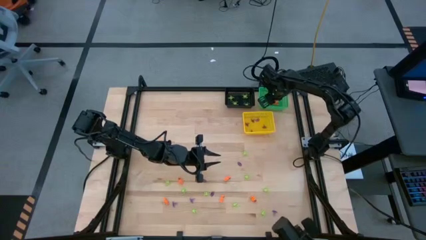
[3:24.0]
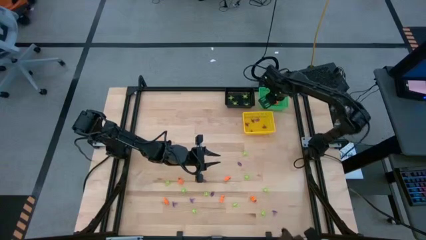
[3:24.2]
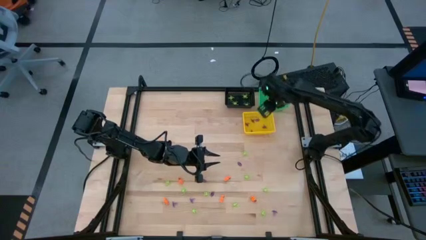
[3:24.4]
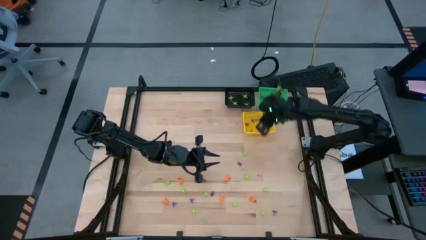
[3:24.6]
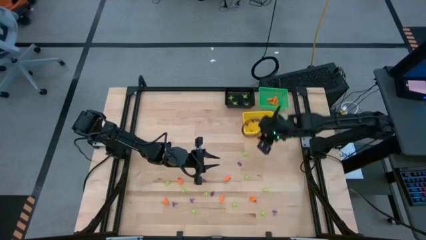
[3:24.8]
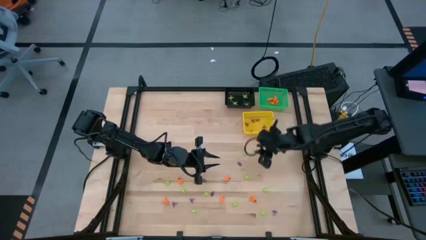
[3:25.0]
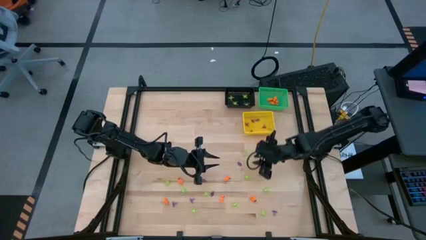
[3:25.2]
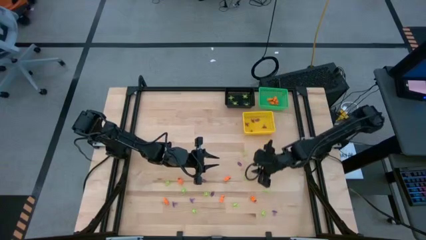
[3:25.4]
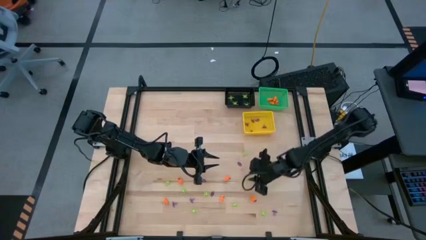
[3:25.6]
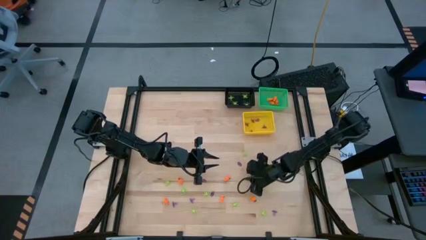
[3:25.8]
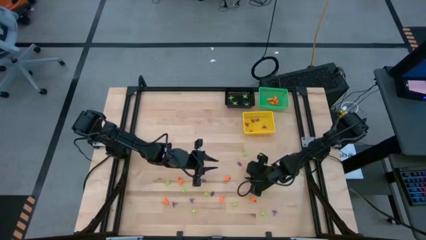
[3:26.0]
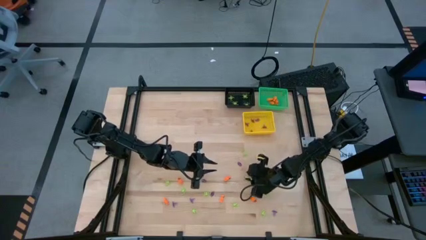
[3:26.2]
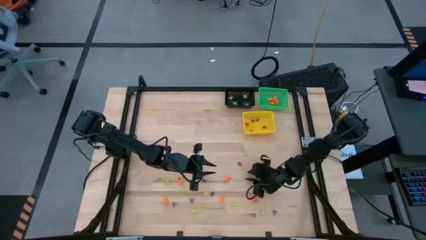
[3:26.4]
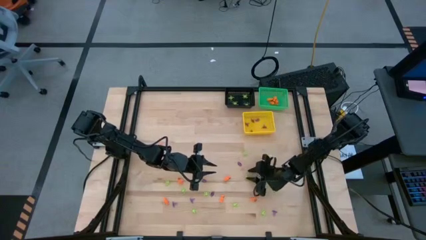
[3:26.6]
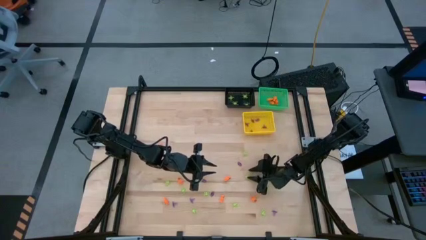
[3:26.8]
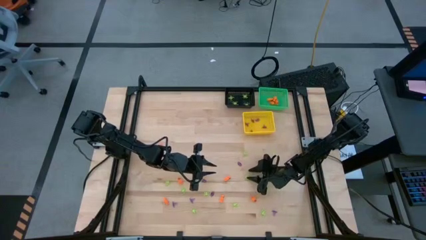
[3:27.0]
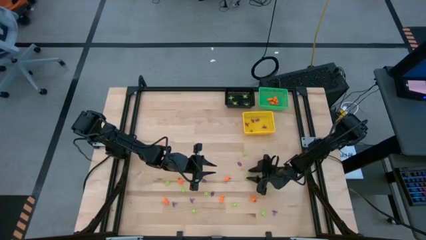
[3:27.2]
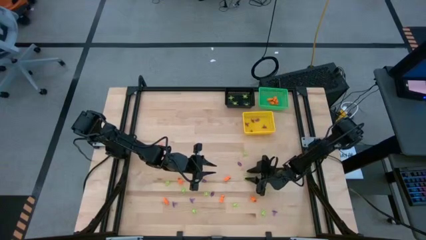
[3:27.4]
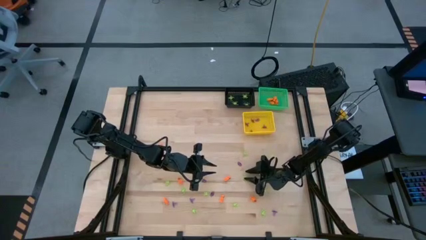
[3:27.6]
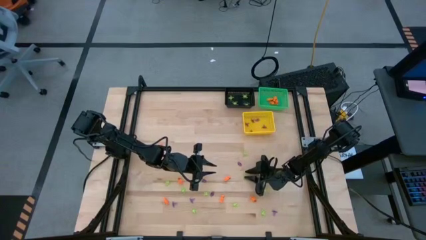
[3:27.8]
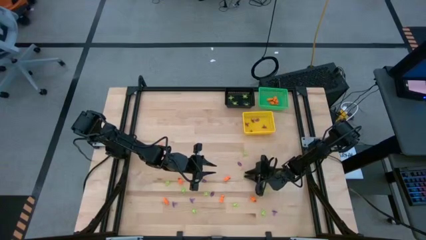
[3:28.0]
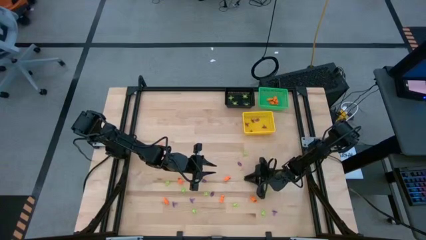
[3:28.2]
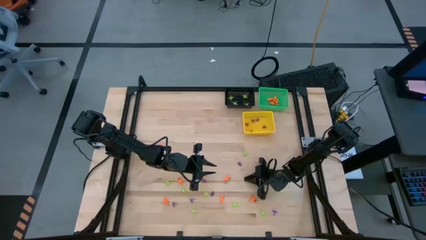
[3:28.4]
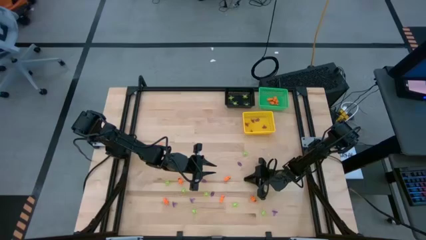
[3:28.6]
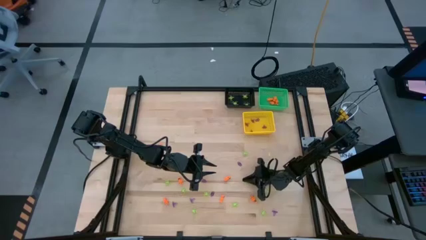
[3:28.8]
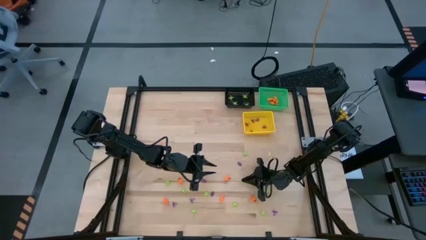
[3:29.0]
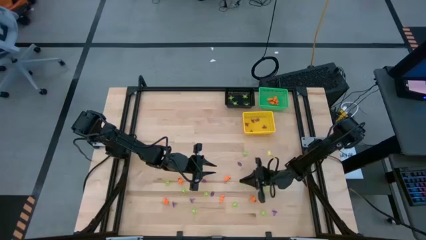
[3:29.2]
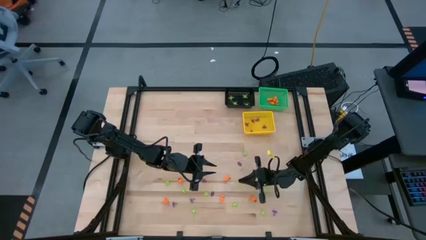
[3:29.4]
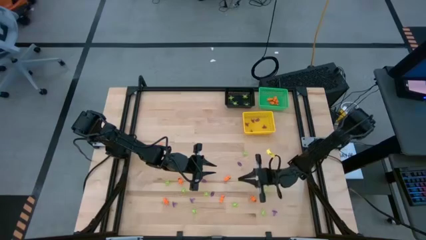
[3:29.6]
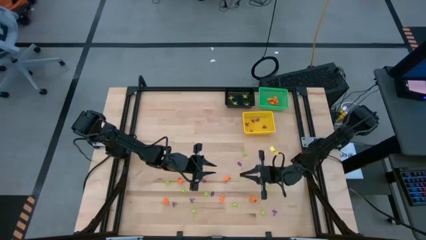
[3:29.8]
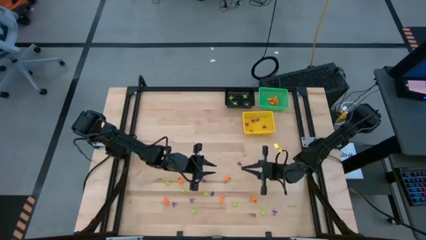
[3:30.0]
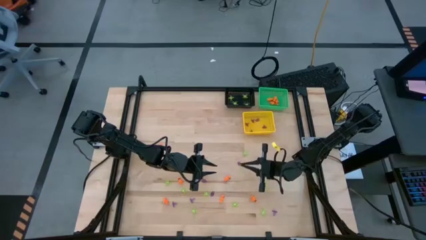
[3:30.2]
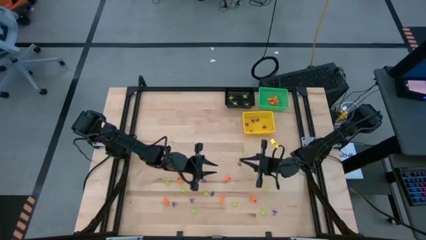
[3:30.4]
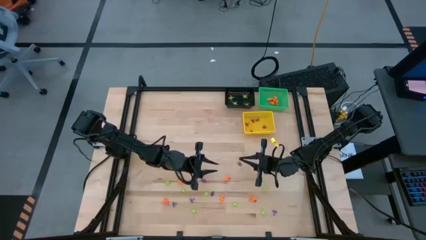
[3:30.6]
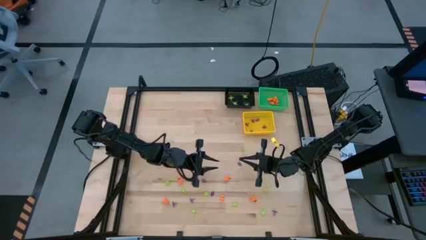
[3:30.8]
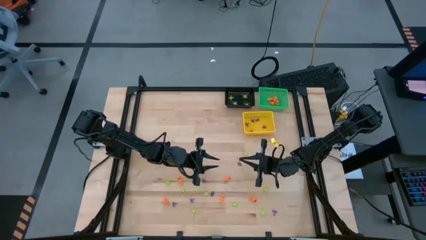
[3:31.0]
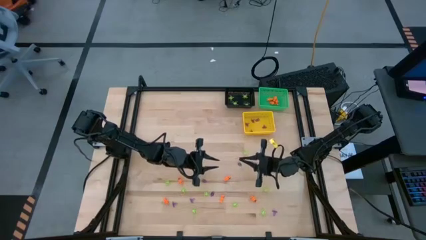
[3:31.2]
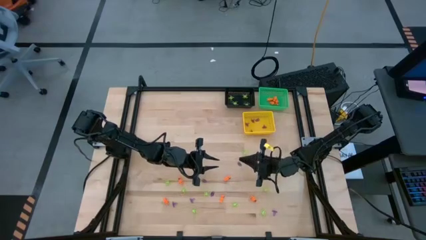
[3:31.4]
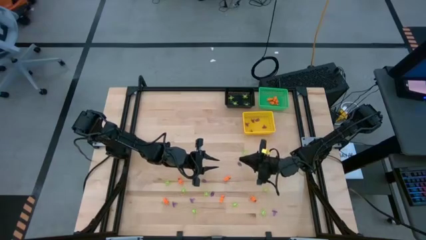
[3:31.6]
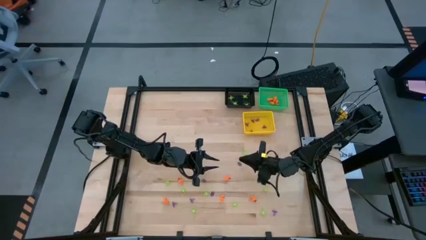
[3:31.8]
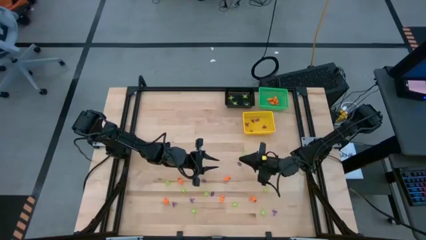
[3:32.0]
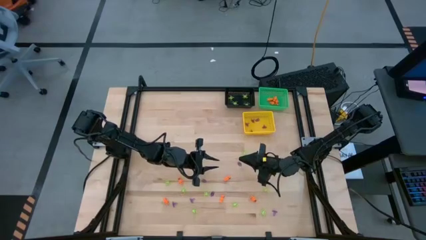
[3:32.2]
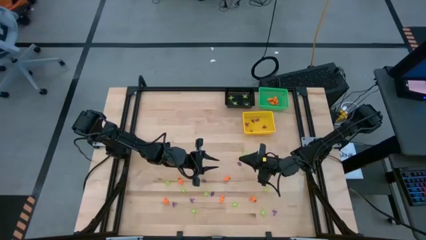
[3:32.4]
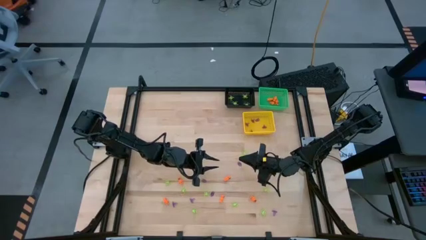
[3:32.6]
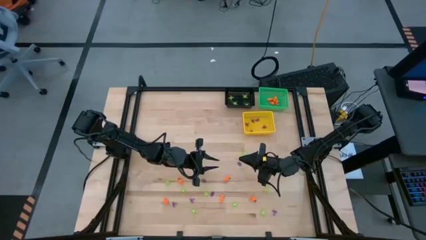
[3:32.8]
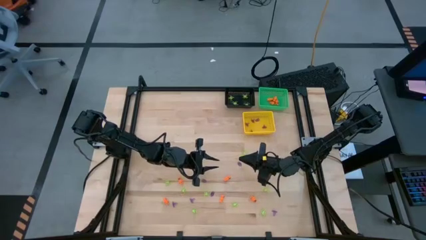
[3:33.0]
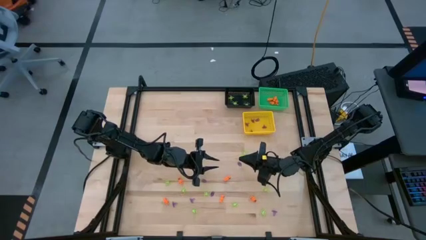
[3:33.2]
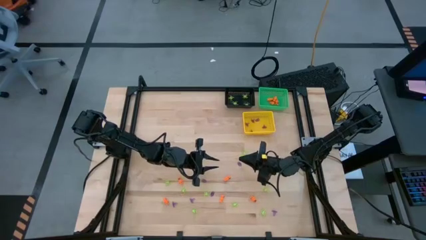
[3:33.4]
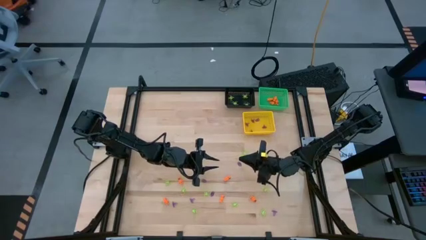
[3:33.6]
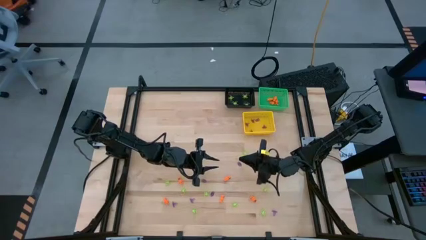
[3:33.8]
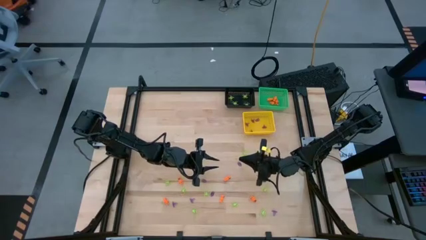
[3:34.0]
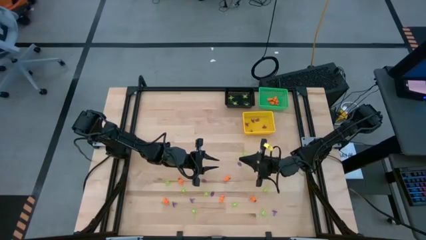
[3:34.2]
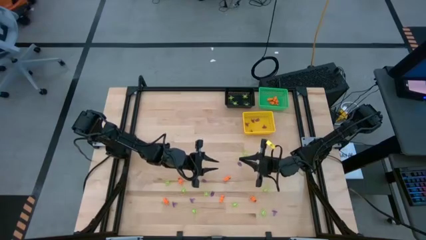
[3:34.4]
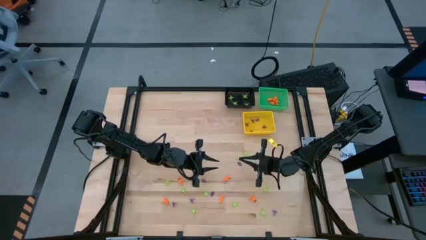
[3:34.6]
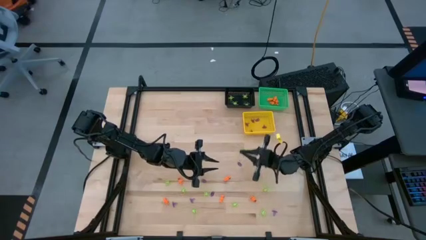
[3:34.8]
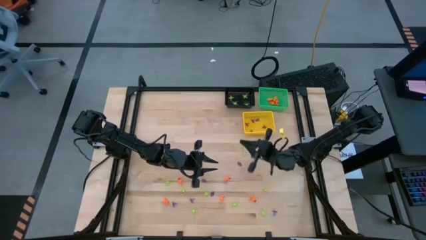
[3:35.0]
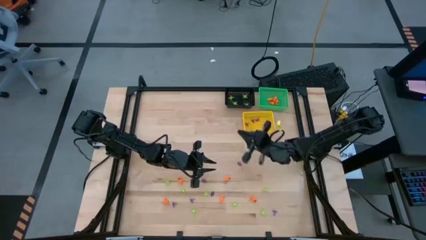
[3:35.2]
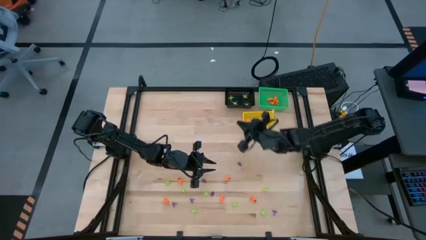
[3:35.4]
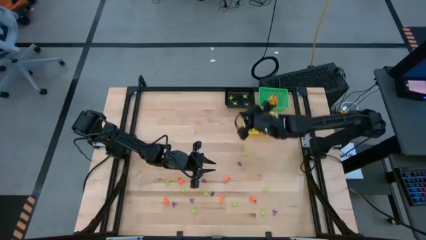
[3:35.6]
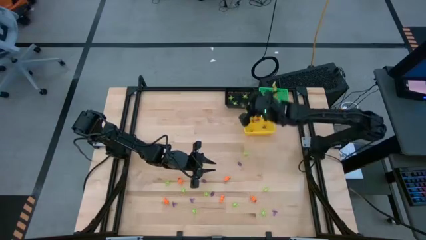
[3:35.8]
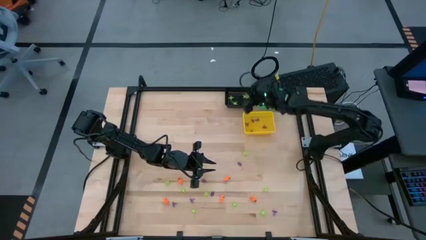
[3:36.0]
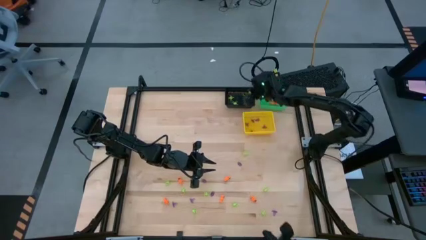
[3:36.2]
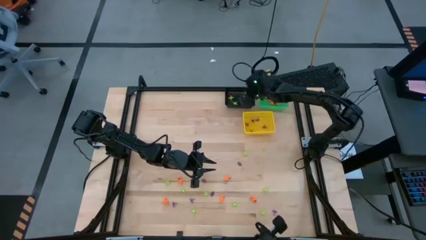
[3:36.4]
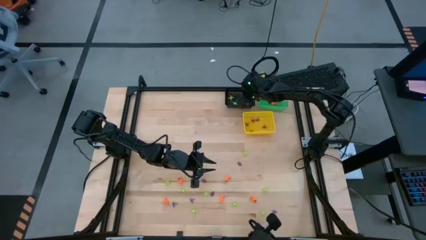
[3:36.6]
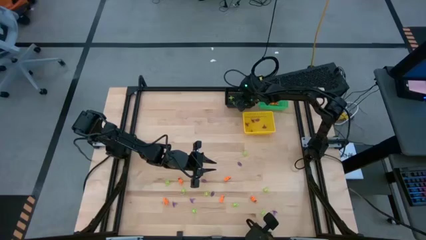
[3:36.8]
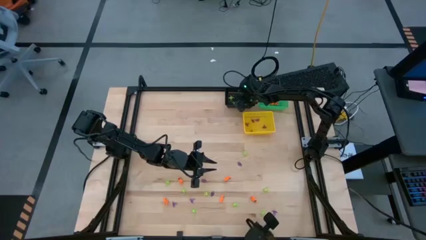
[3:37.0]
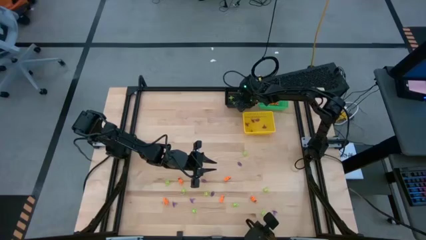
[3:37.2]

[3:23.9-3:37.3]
Task: Sort Halloween decoration
Put the green spider toy into the black basket

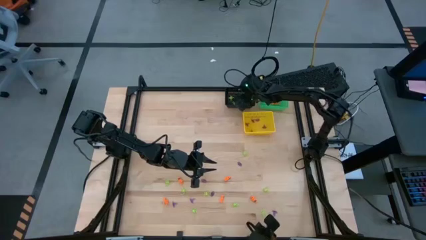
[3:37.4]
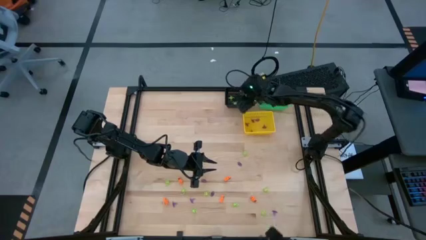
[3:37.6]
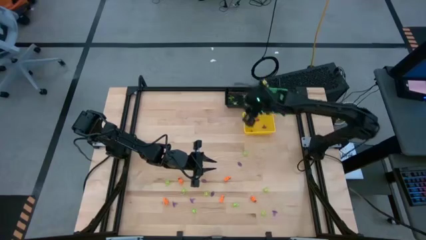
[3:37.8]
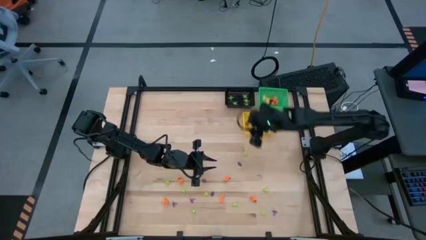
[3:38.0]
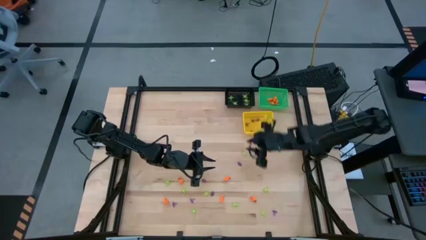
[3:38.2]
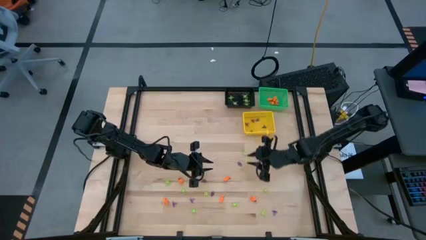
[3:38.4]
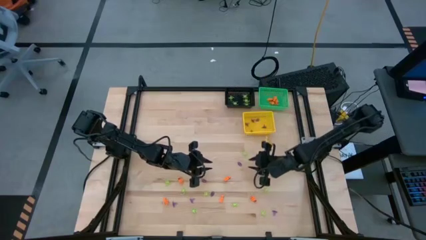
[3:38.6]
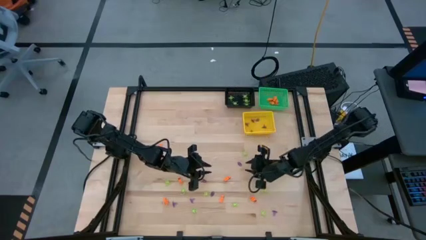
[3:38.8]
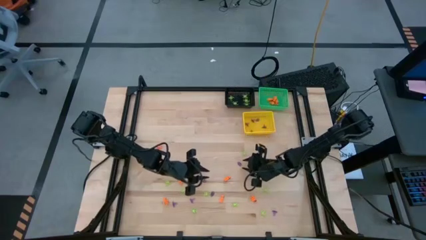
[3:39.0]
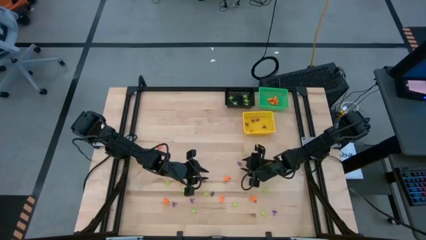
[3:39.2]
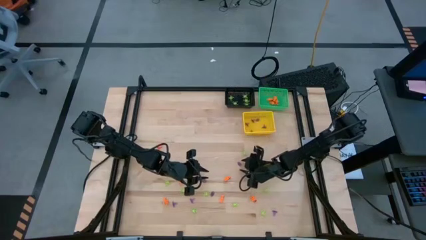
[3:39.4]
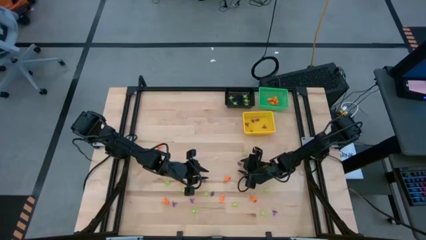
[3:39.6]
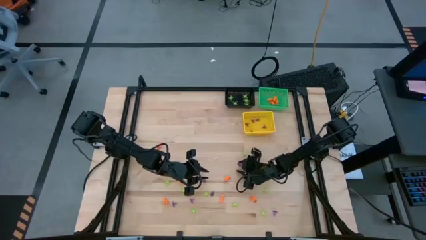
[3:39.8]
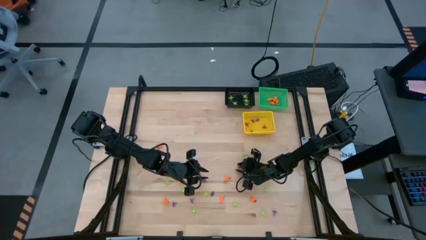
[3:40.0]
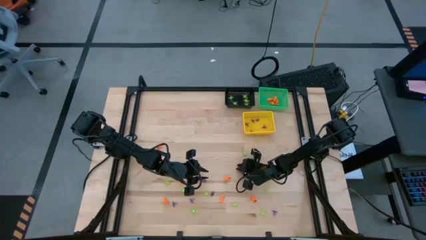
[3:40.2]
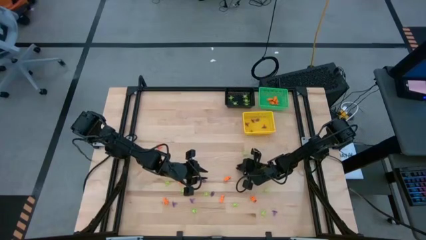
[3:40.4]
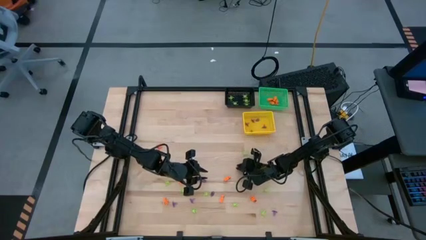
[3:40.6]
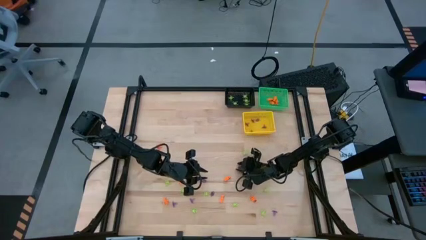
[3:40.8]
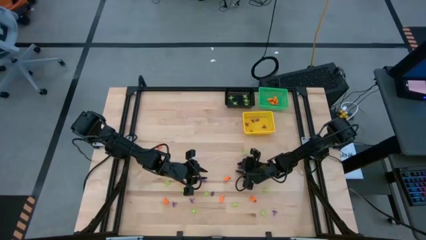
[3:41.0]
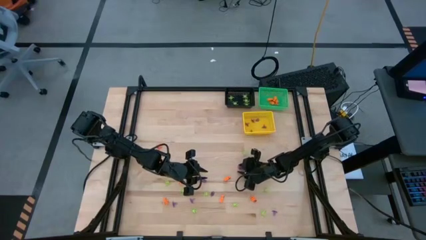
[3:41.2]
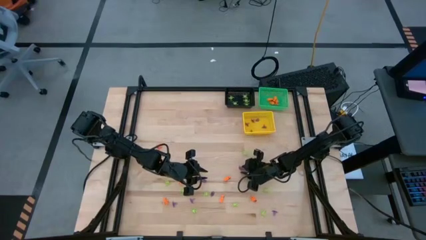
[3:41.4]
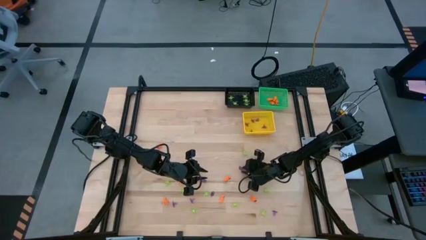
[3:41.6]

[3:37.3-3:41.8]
Put the violet witch hat toy into the yellow basket
